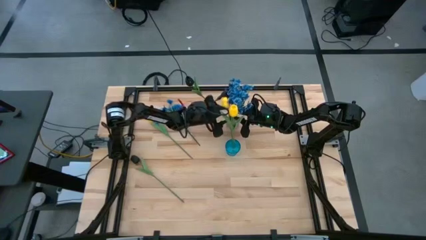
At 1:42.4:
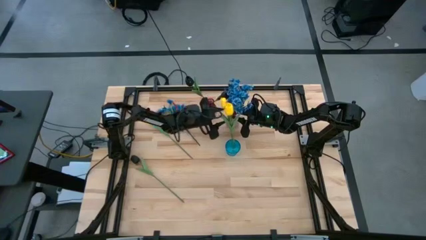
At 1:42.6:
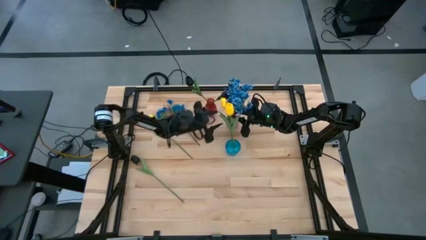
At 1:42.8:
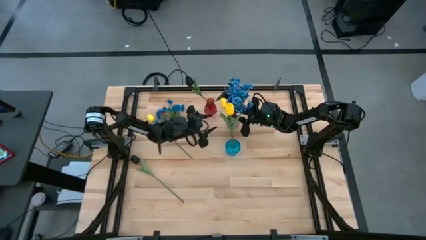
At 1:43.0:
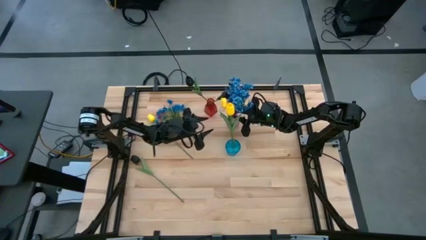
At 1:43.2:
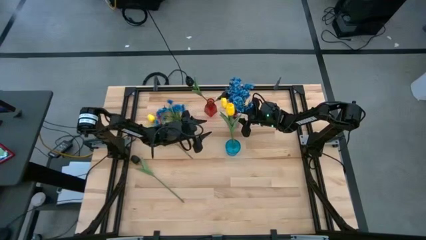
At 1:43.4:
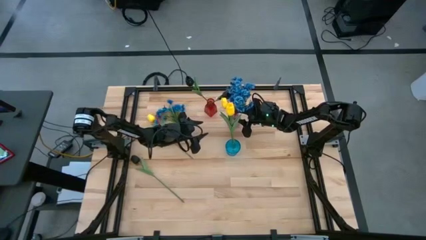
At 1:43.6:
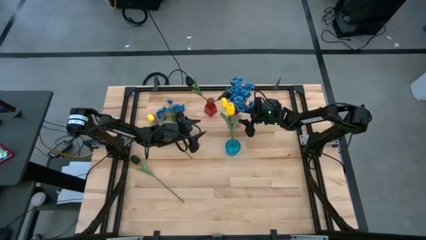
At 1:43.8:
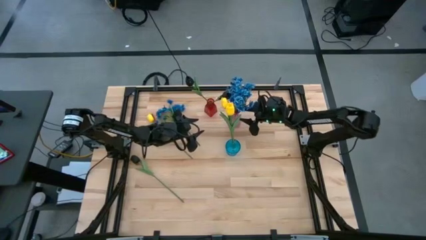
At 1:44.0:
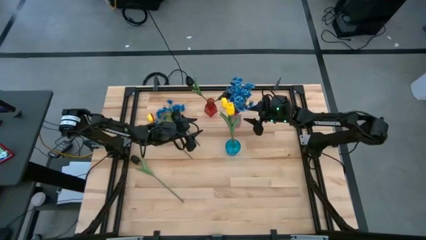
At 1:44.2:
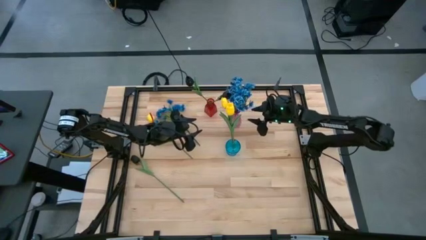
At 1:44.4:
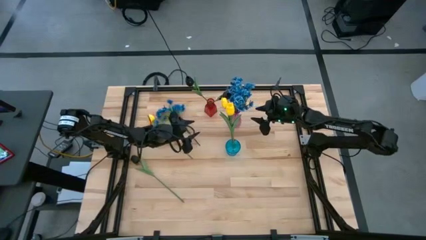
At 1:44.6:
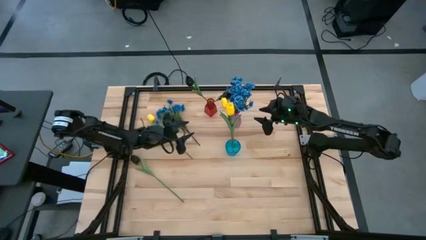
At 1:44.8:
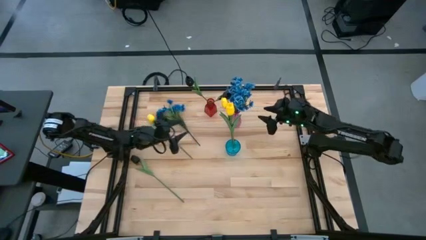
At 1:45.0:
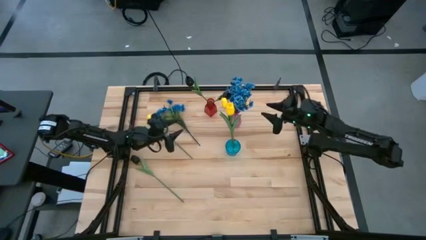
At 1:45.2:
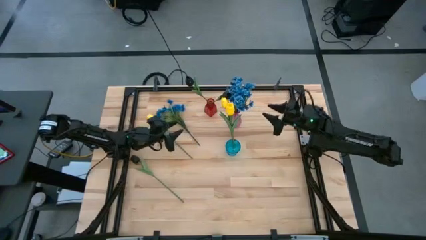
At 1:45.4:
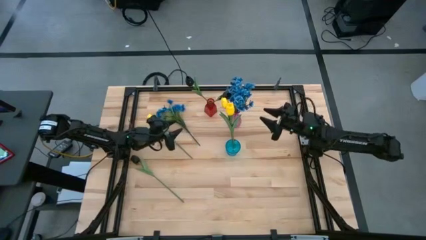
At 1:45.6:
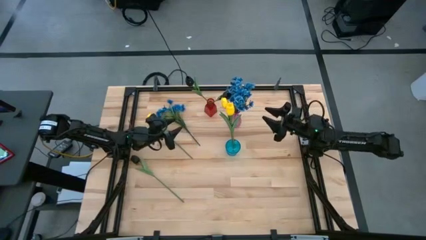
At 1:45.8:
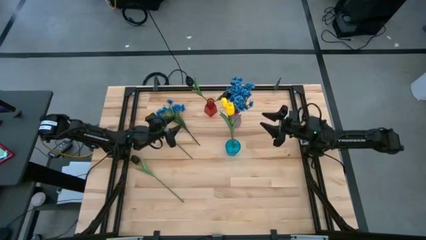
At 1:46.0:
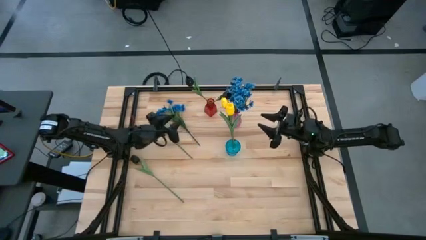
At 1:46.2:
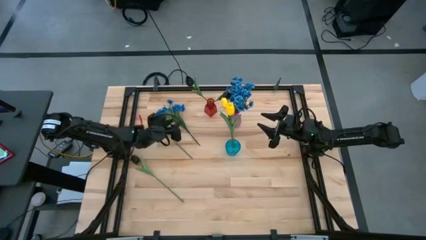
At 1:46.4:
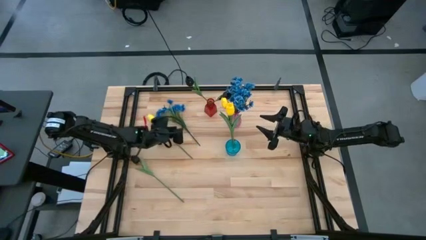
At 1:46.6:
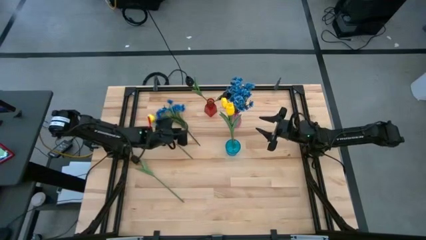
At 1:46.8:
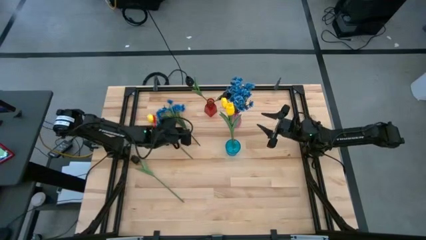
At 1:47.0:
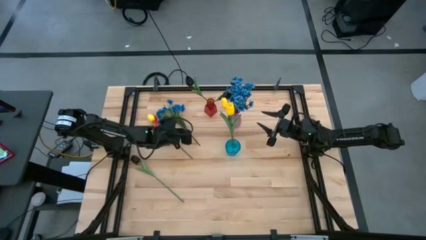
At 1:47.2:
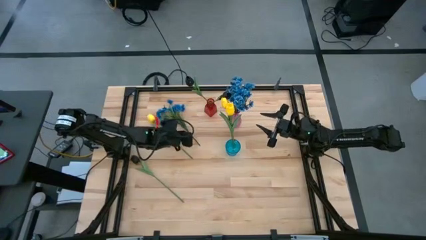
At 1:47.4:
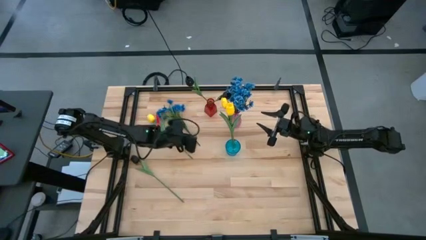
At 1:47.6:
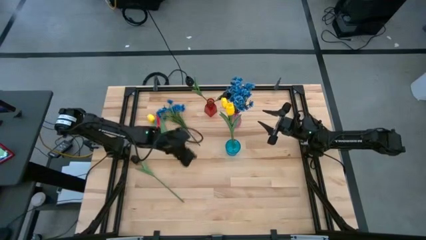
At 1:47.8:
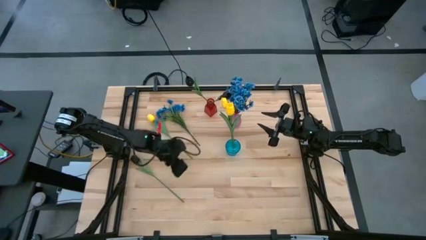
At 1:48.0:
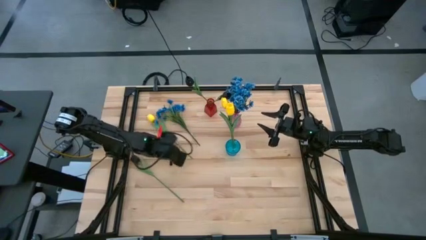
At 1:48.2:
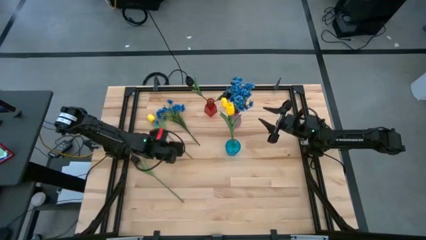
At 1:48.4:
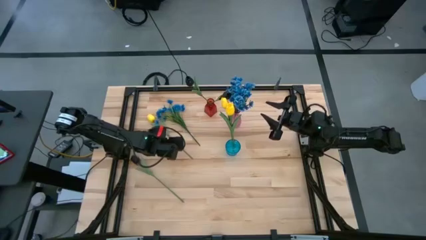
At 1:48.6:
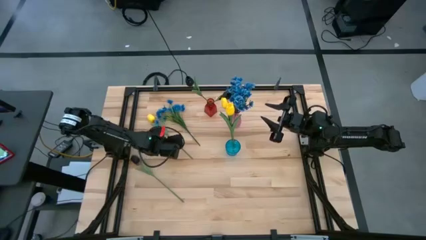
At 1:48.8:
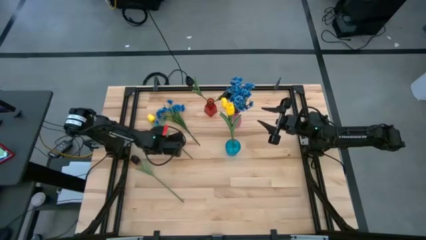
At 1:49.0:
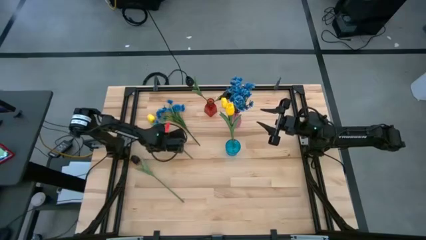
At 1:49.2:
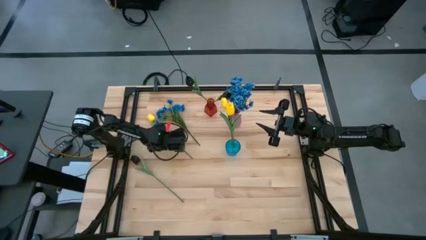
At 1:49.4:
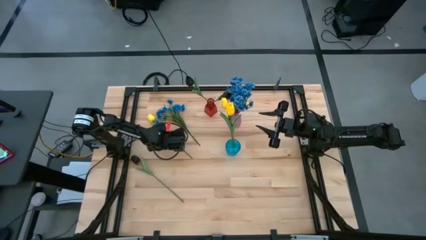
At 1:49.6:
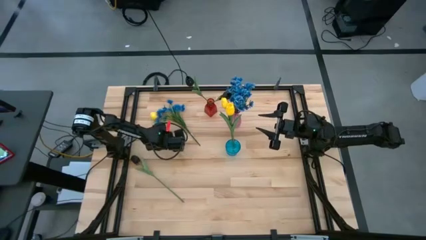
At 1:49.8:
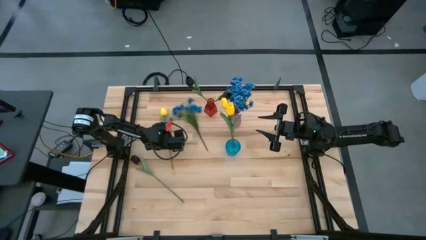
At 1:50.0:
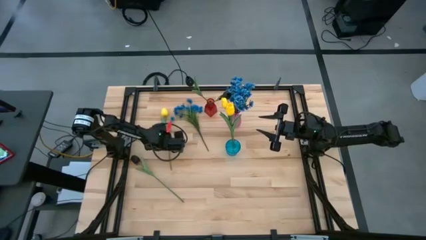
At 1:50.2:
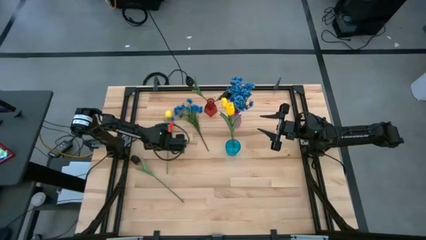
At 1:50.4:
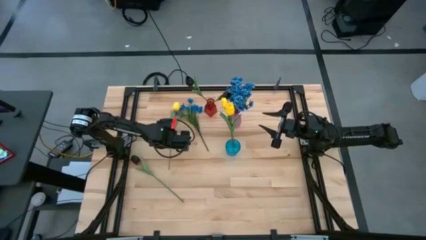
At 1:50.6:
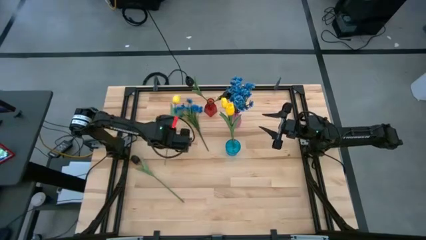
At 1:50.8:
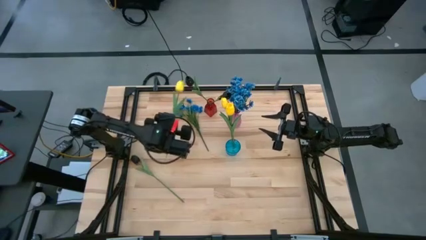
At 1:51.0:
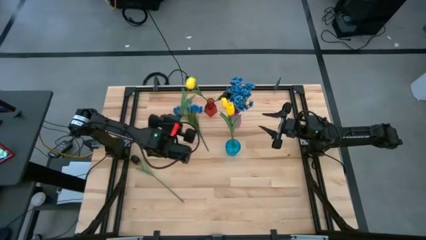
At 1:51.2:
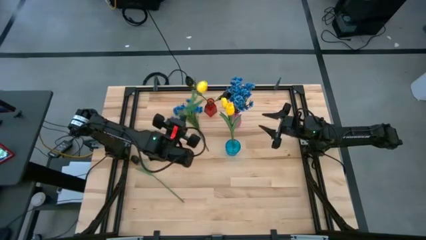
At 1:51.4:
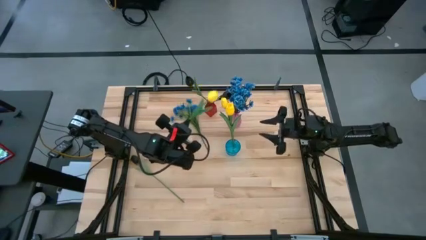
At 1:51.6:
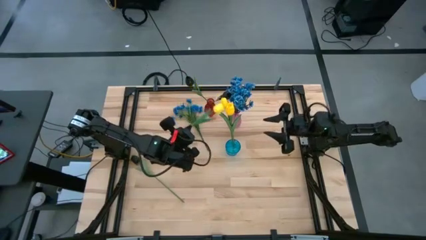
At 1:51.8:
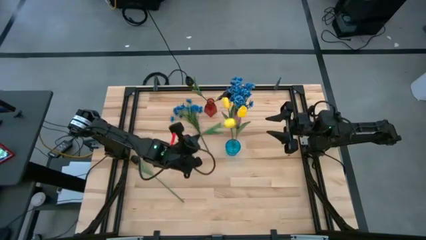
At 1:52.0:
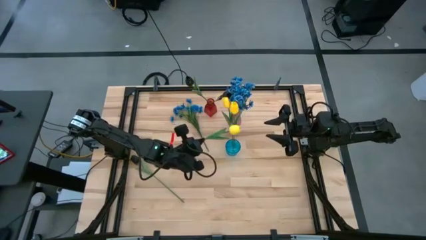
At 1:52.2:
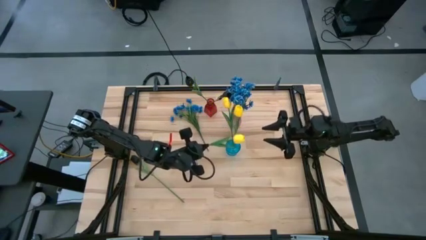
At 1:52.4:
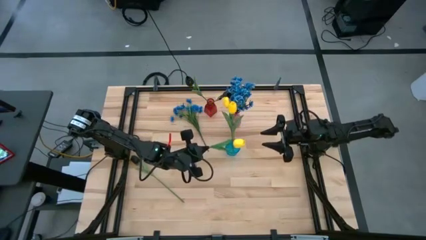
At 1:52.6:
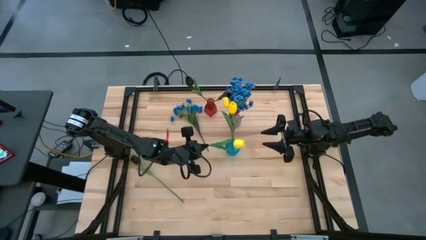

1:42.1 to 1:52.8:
Task: Sort flowers into vase by color
Put the yellow flower into the blue vase

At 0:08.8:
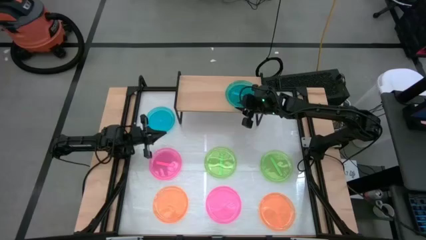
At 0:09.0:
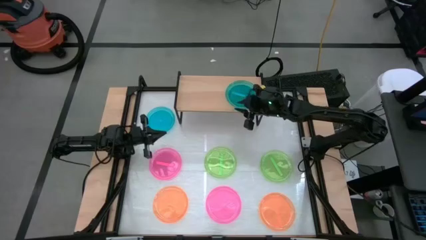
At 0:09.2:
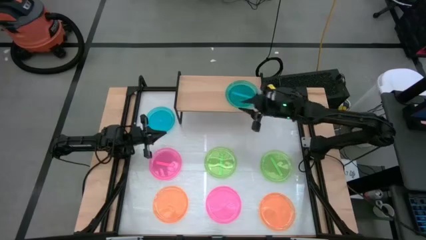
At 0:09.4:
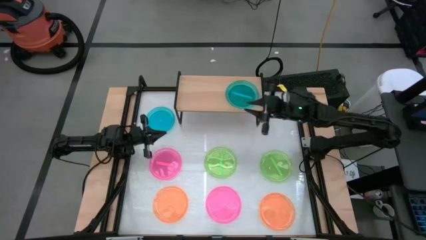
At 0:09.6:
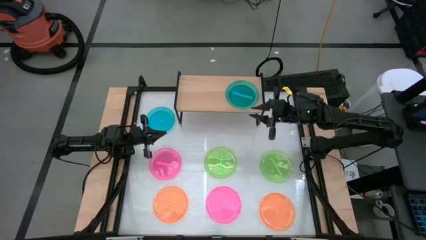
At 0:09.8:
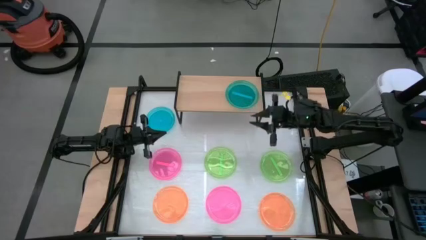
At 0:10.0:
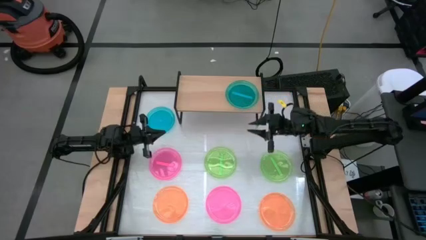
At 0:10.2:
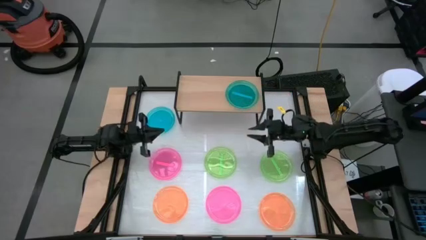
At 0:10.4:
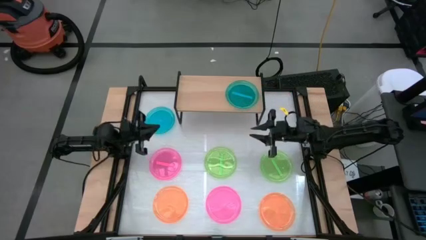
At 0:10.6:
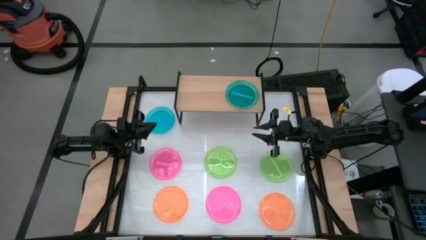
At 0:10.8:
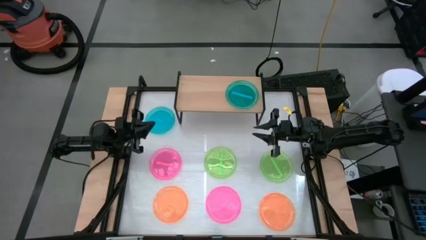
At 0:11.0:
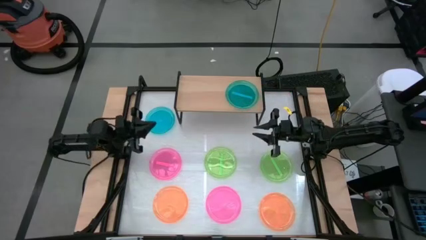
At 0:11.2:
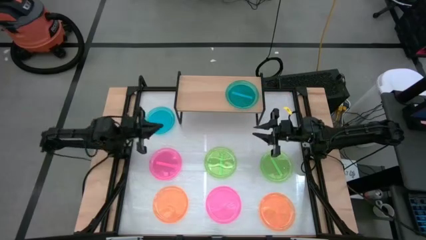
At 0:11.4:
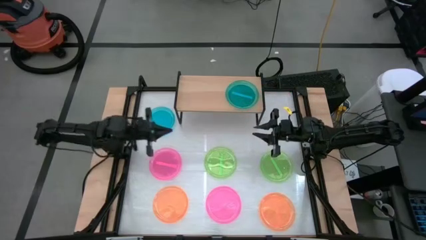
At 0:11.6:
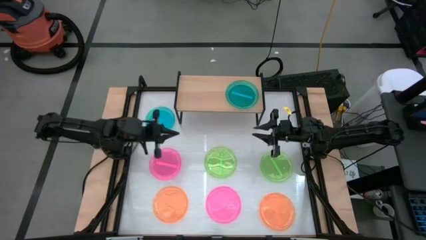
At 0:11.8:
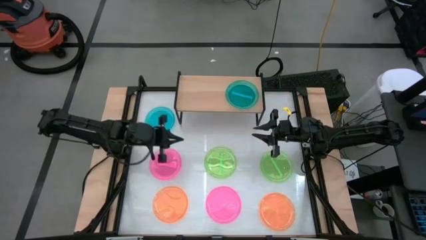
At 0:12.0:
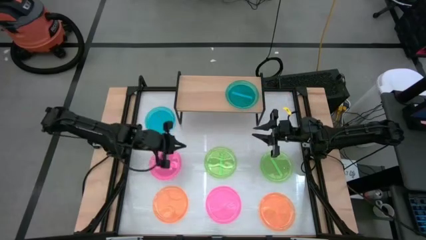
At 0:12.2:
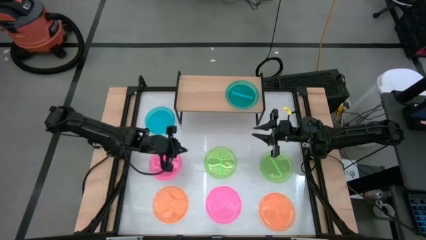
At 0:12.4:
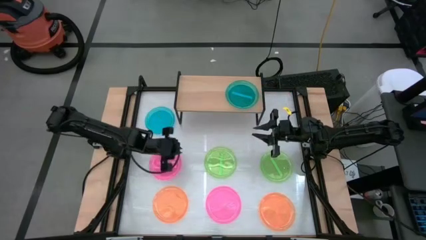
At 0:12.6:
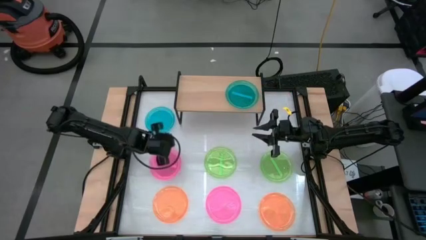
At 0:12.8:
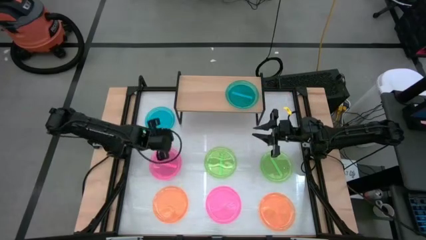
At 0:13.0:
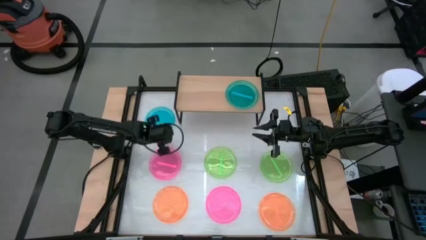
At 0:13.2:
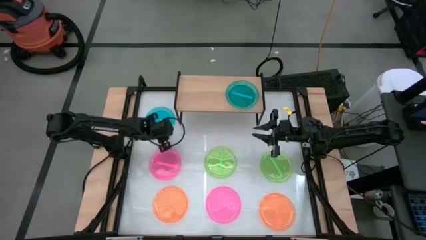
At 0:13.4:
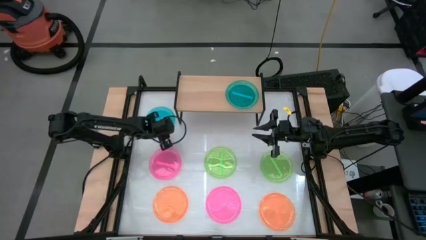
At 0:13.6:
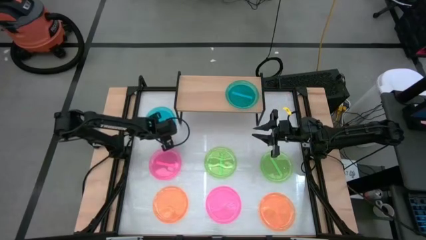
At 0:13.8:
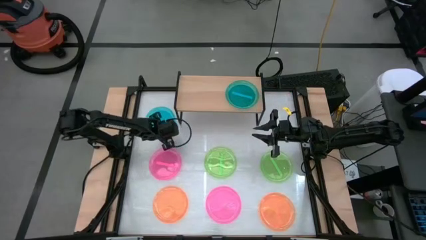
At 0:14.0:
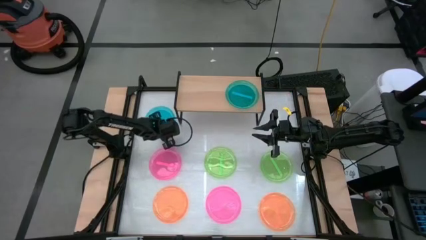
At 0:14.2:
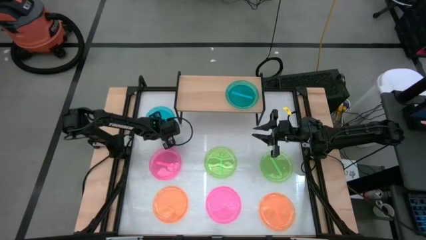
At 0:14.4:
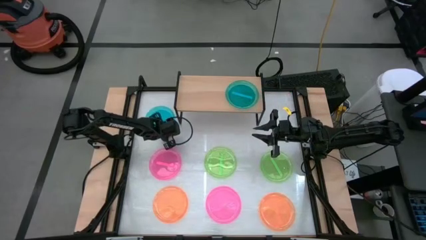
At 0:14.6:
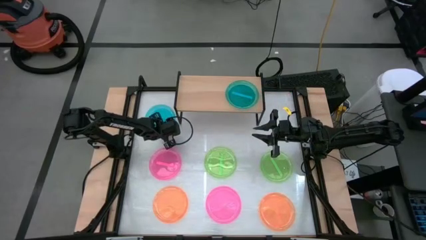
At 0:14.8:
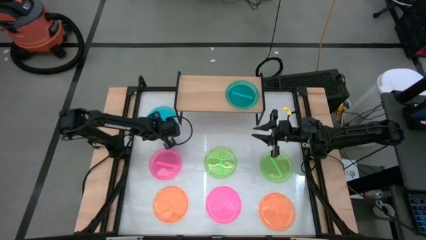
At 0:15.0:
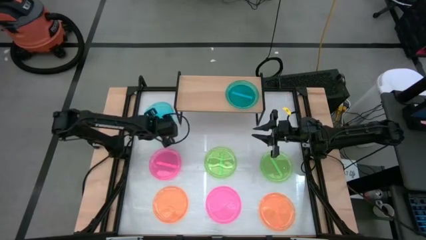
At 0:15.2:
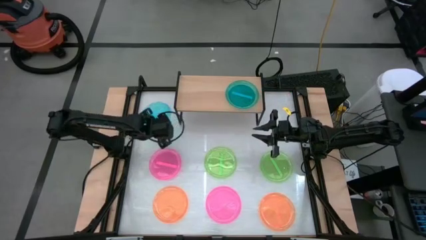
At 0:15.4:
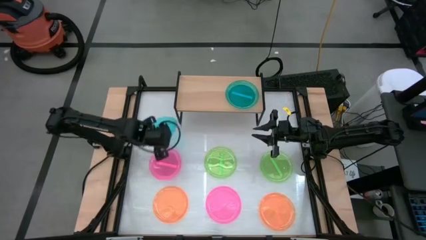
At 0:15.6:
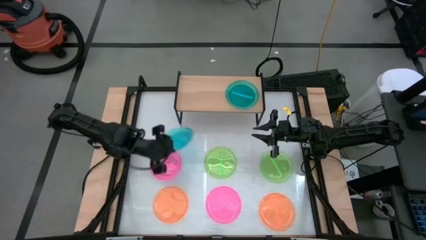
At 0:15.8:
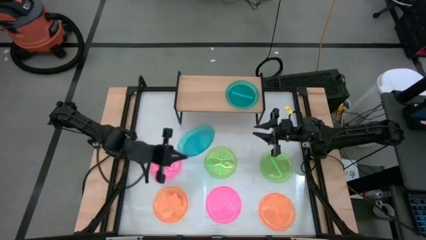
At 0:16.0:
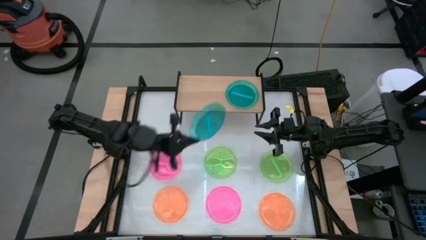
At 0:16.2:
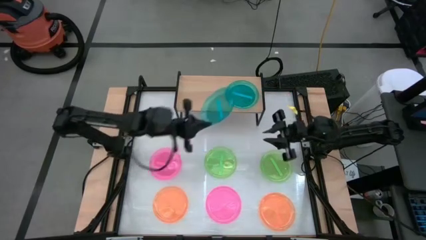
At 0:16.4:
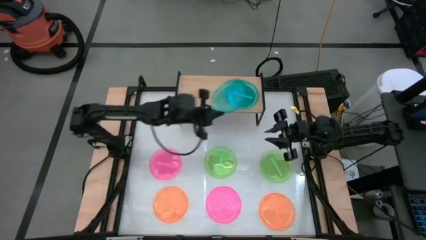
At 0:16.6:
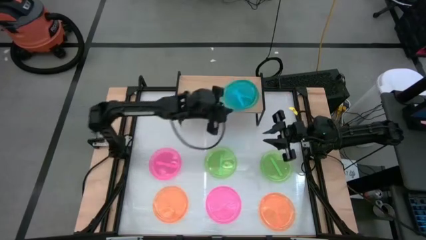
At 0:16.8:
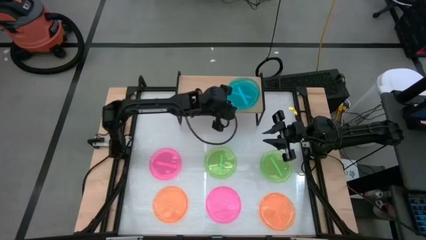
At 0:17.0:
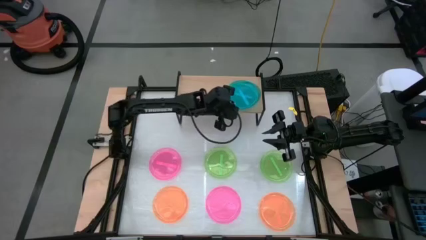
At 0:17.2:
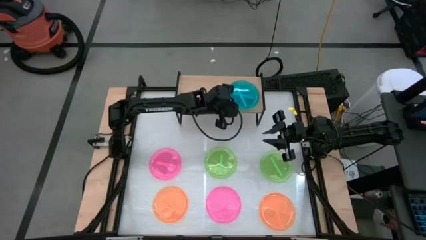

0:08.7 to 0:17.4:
Task: Place and stack plates onto a shelf
Stack the blue plate on the blue plate on the shelf
